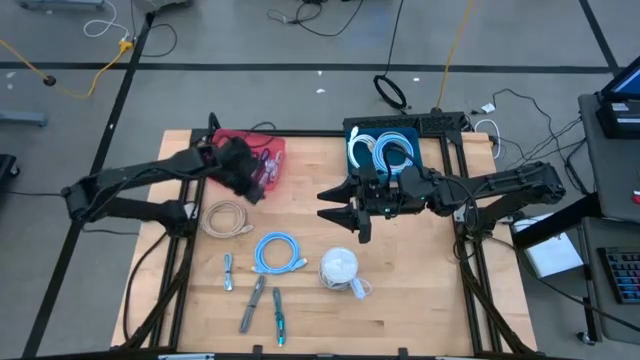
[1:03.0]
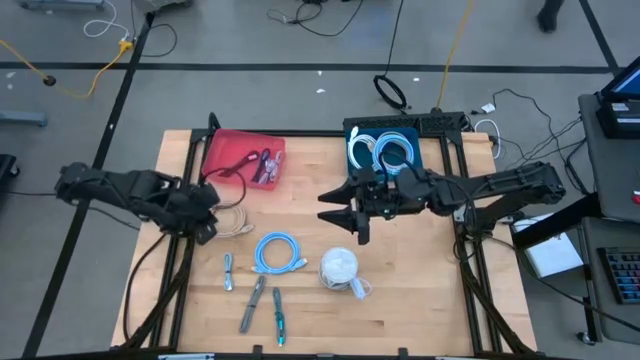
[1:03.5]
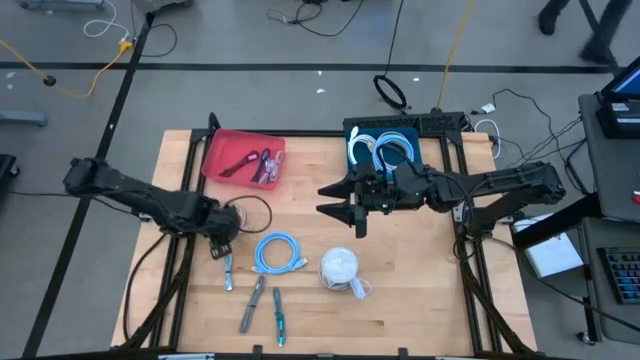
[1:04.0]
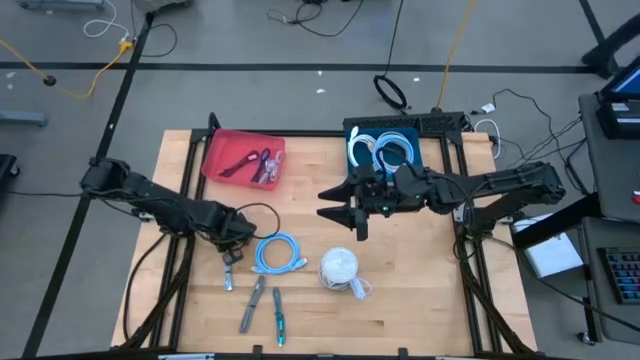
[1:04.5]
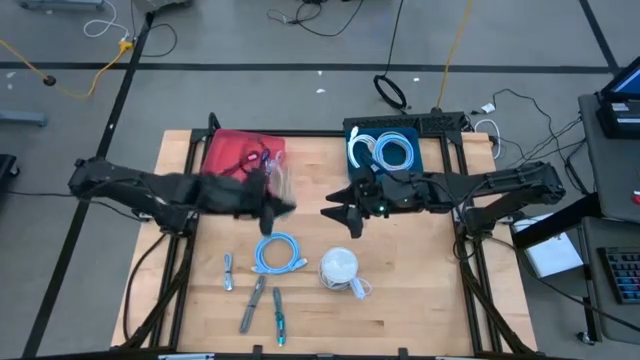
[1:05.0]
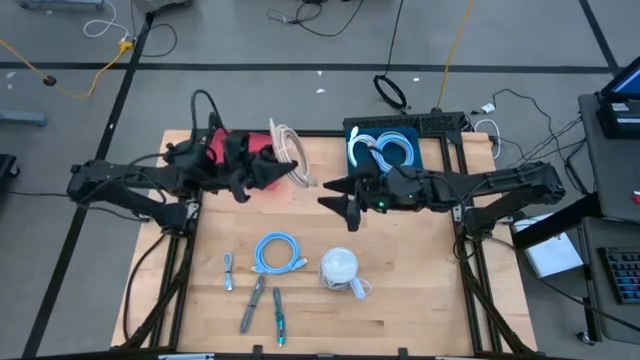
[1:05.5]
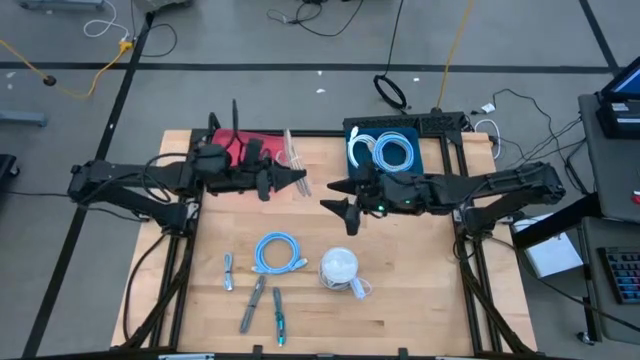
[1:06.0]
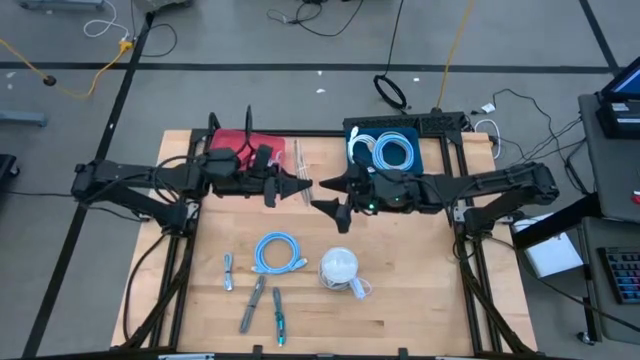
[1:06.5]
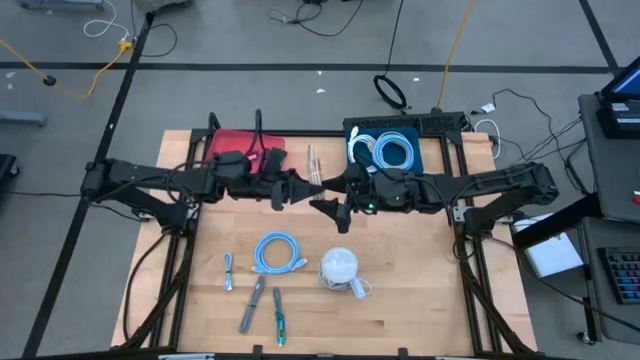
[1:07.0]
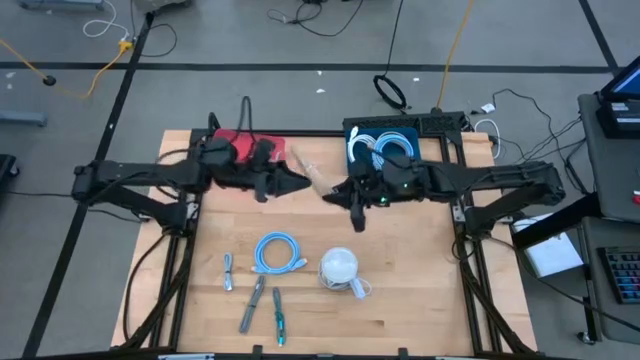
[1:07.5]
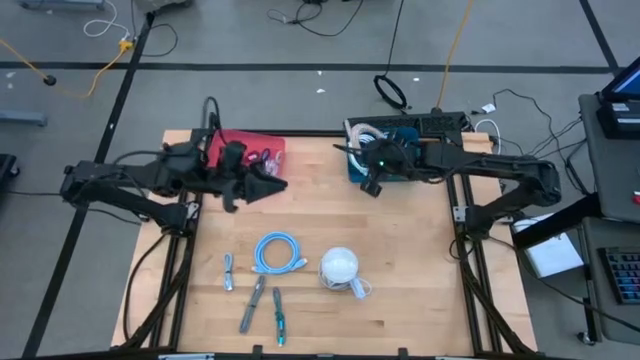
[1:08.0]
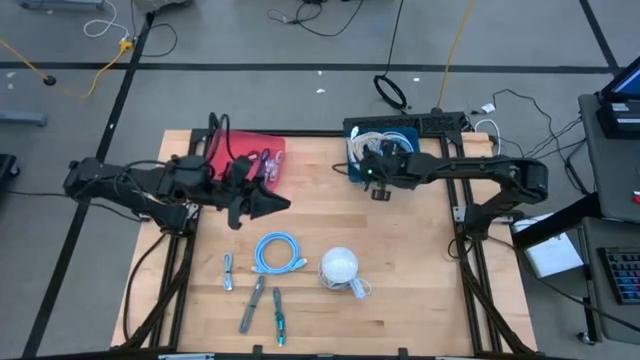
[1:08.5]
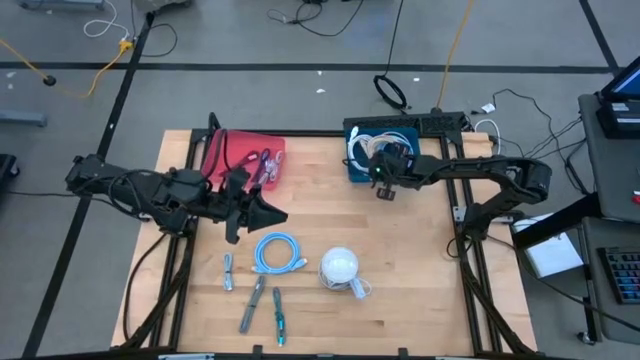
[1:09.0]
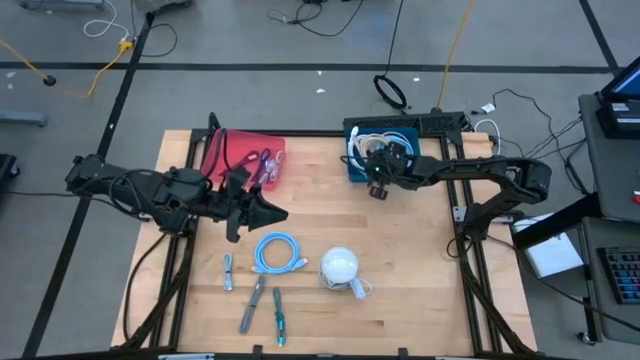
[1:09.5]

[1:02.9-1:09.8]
Task: Pick & Place USB Port
Put the light brown USB cable into the blue bin

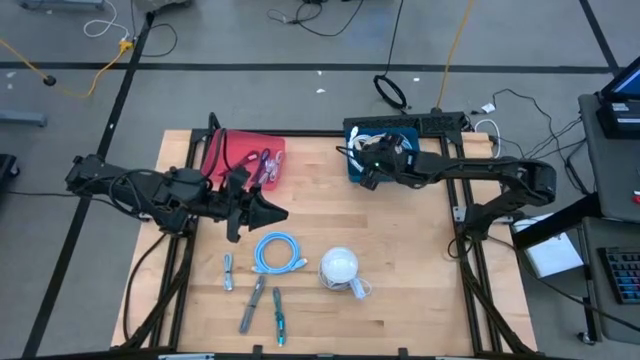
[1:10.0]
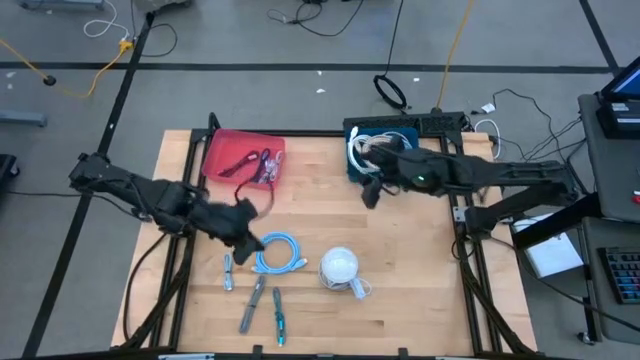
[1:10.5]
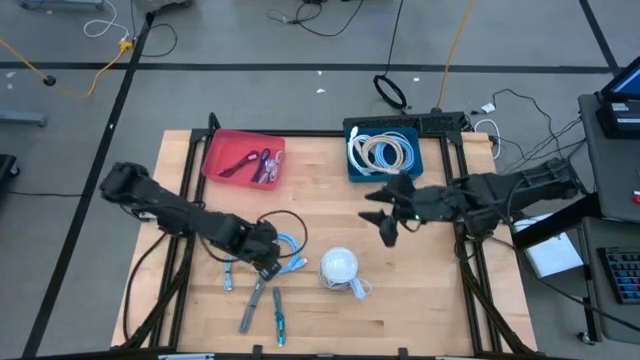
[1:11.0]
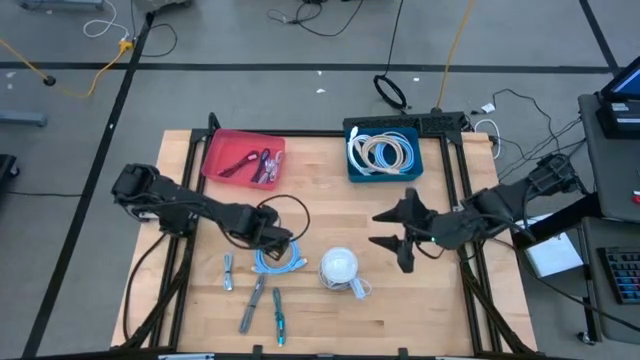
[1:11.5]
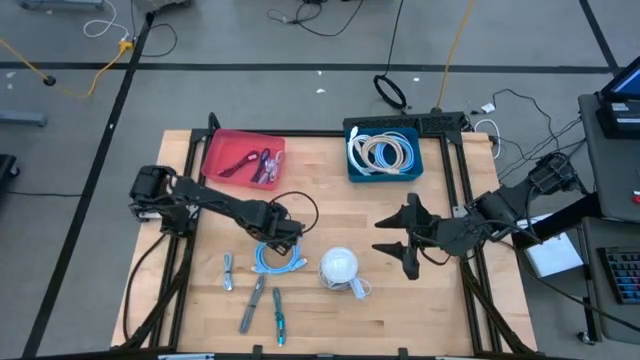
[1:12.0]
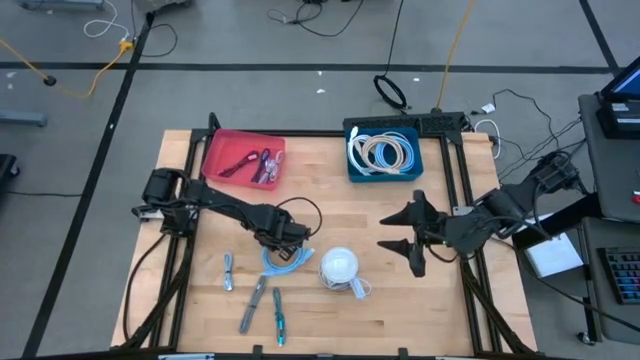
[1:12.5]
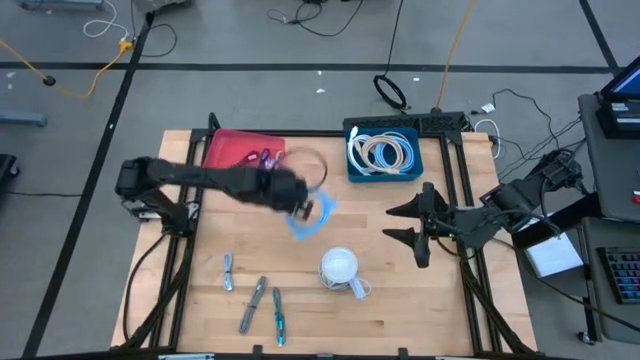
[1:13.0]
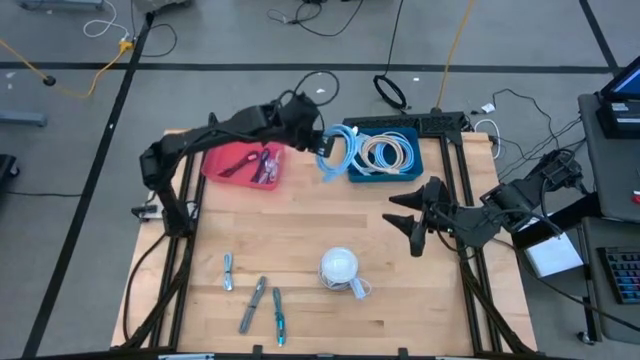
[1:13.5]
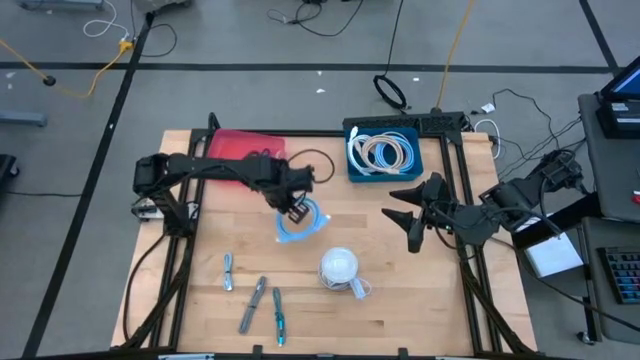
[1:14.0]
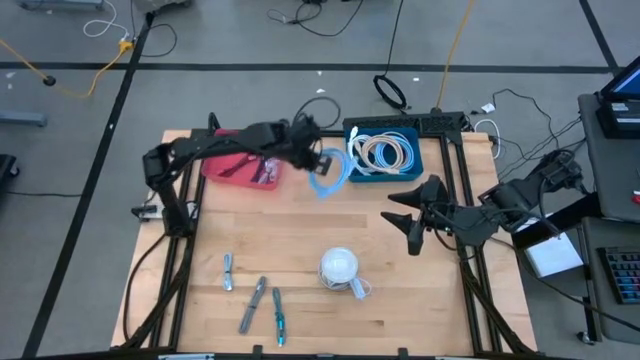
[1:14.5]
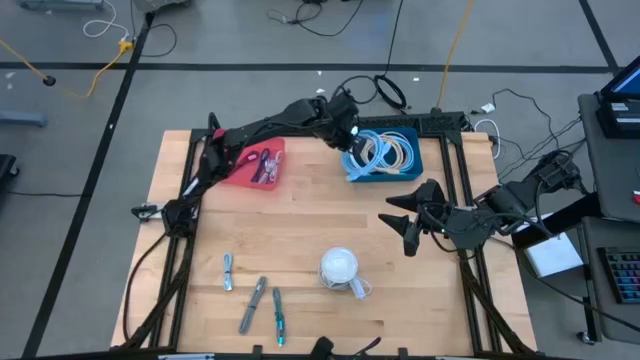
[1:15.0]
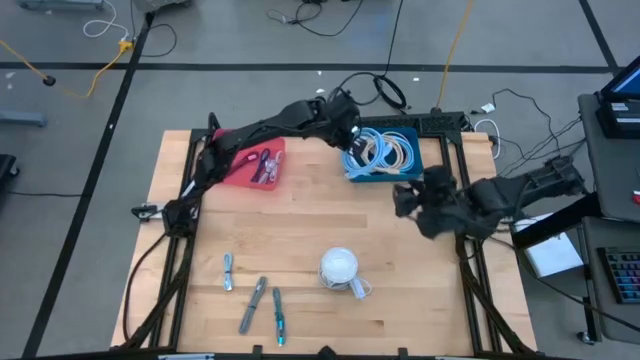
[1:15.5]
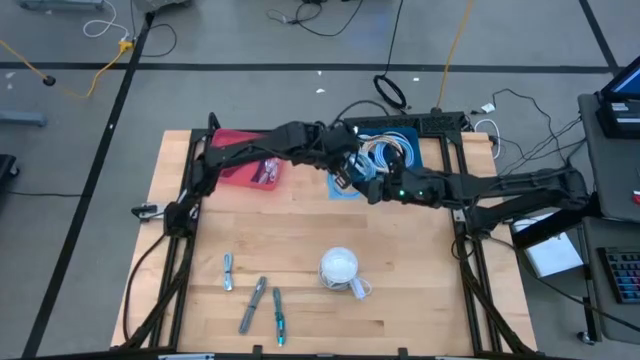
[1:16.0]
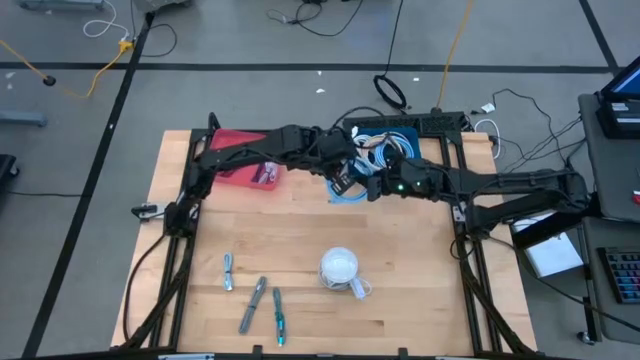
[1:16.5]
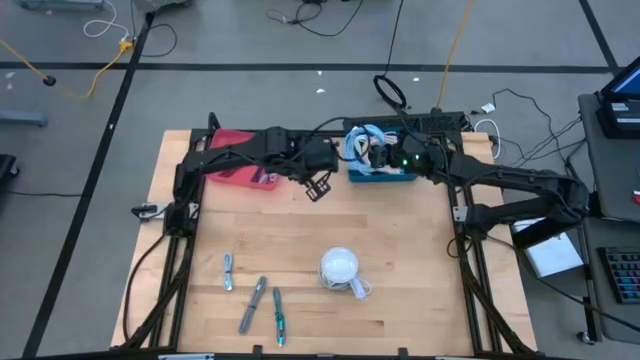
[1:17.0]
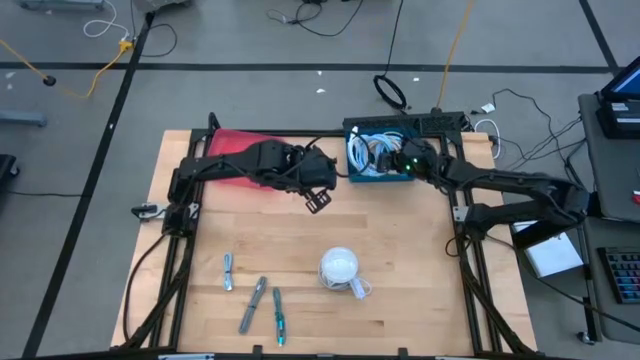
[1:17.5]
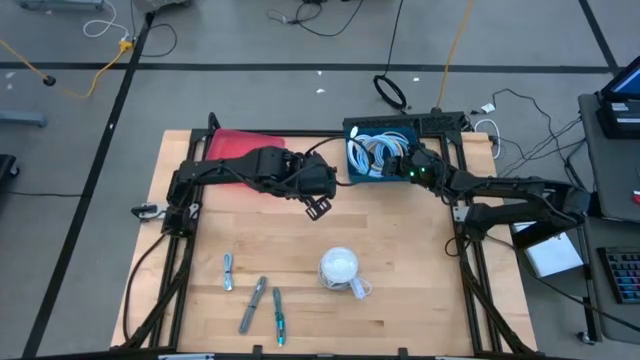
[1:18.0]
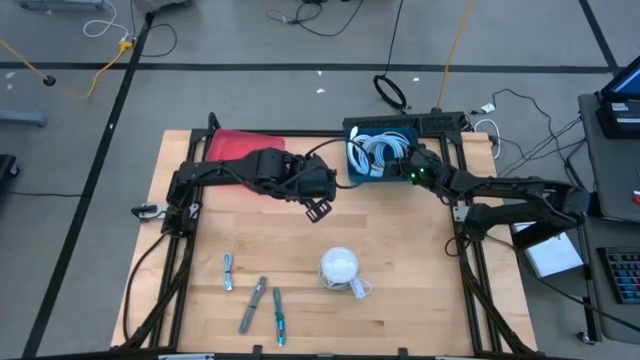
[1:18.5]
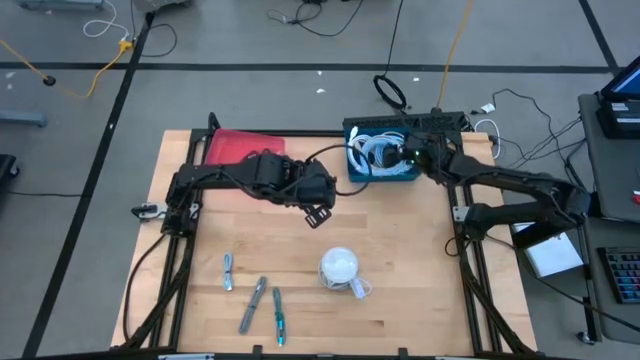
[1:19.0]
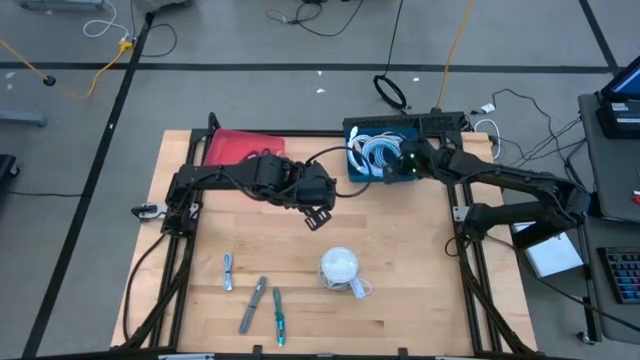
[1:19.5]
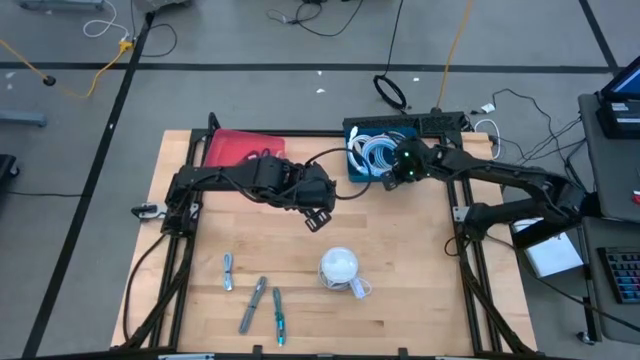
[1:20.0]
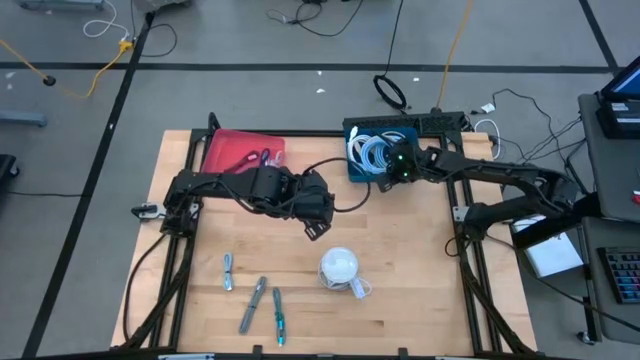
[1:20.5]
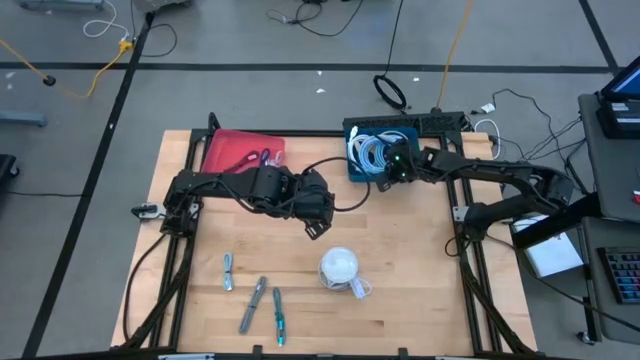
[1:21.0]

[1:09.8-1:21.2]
Put the light blue USB cable into the blue bin

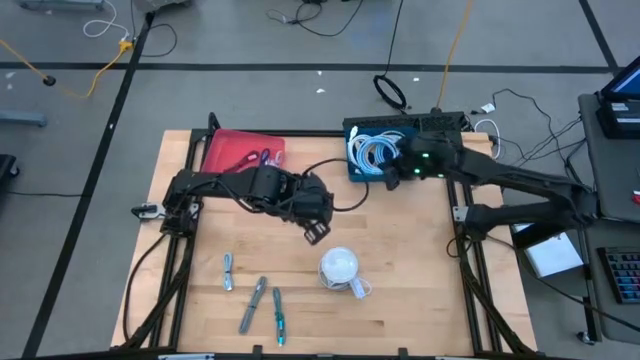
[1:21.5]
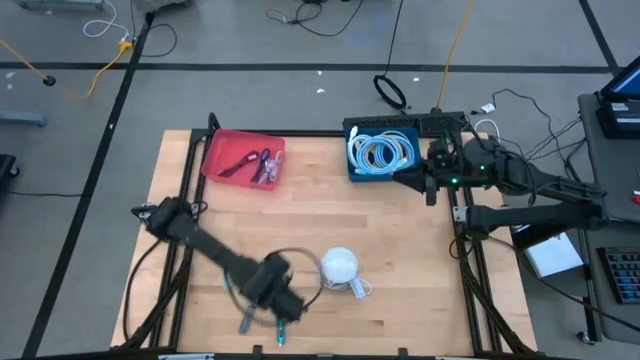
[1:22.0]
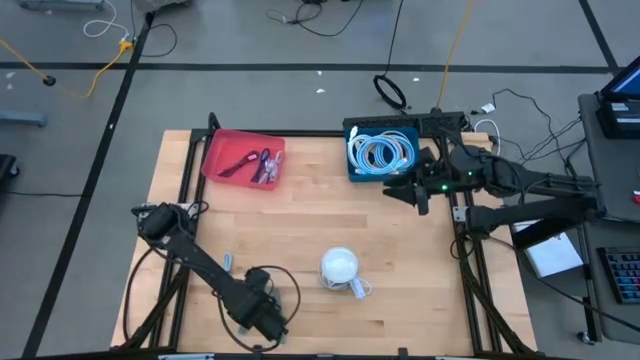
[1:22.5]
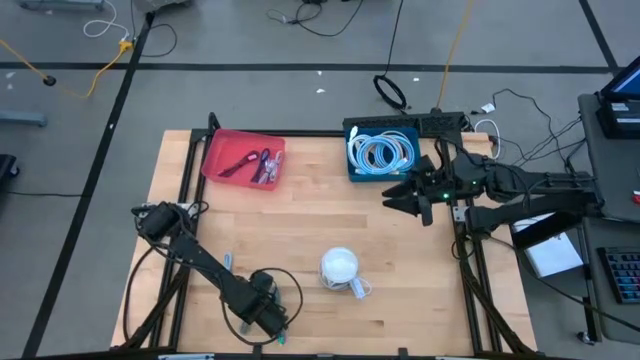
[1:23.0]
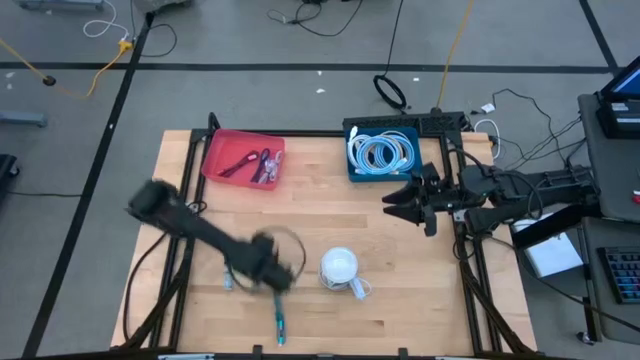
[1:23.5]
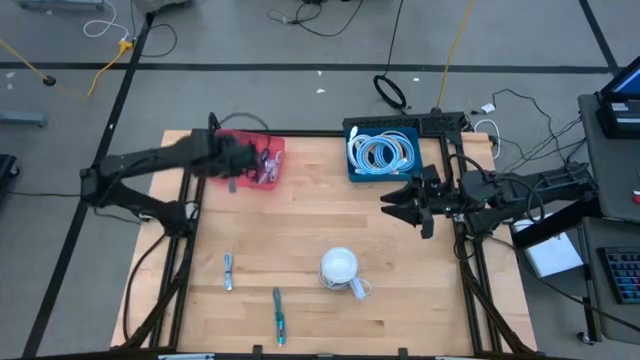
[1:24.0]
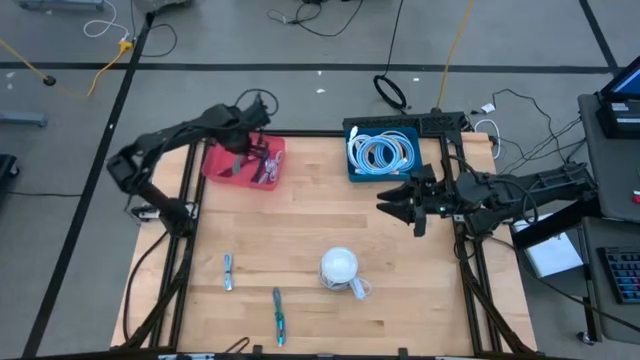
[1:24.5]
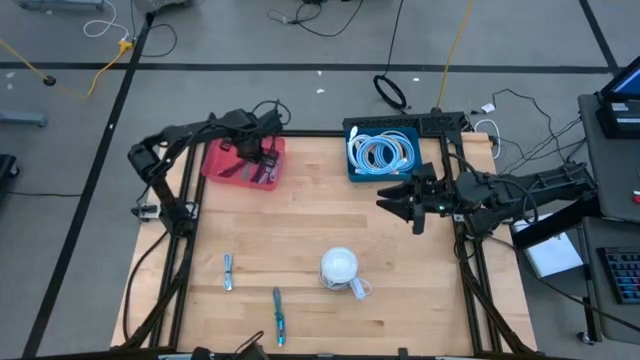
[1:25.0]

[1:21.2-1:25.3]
Put the black USB cable into the pink bin
